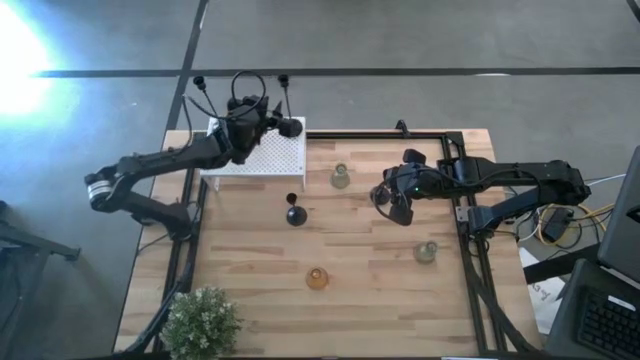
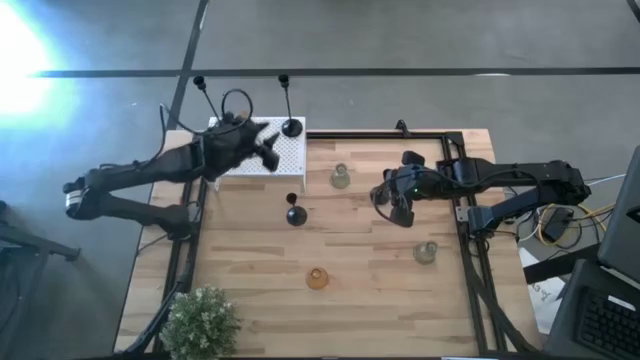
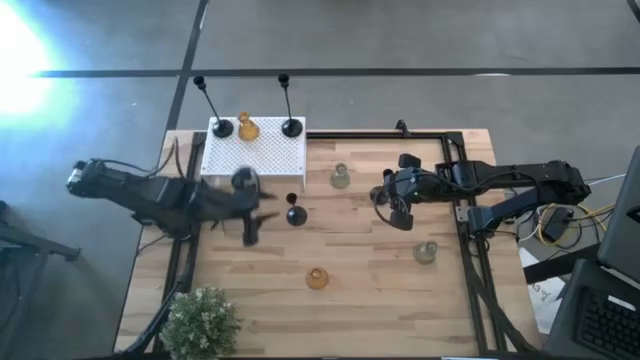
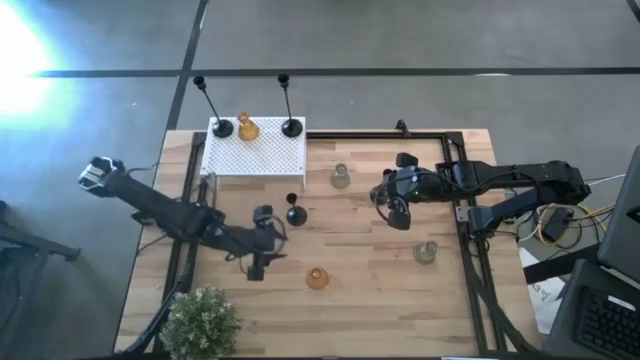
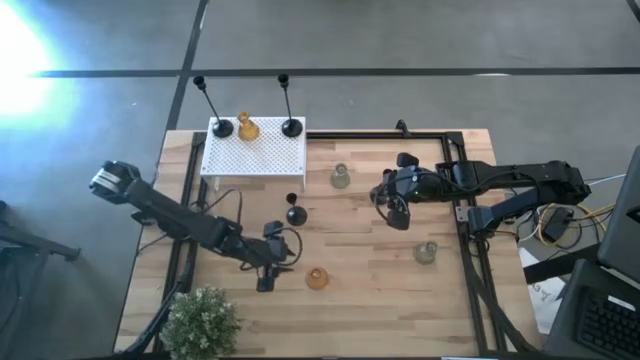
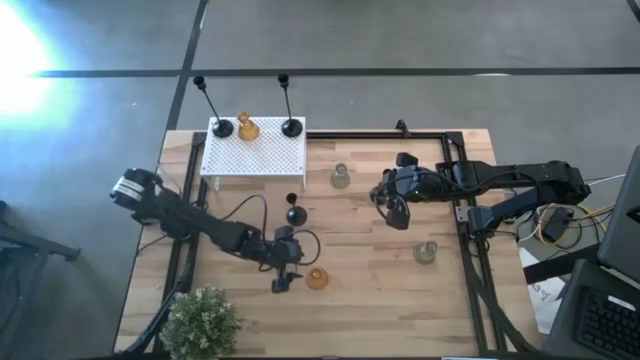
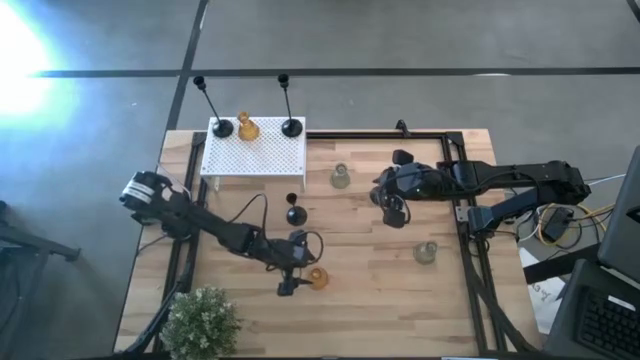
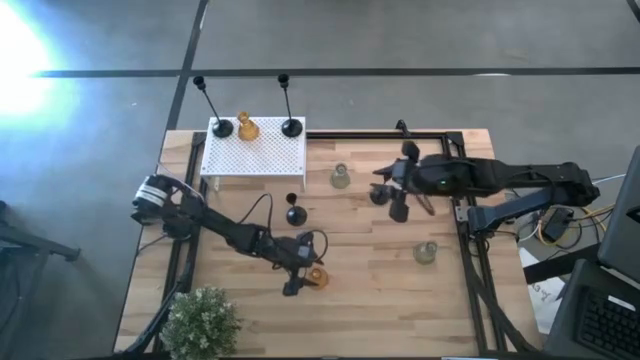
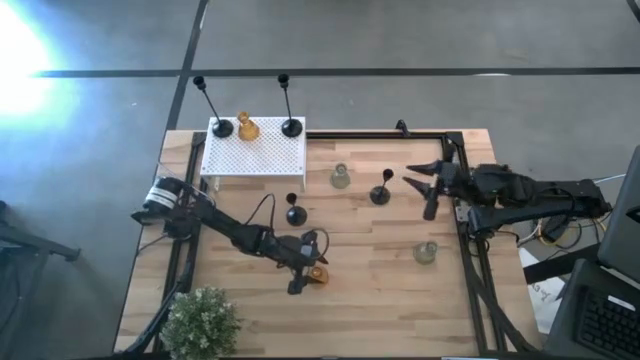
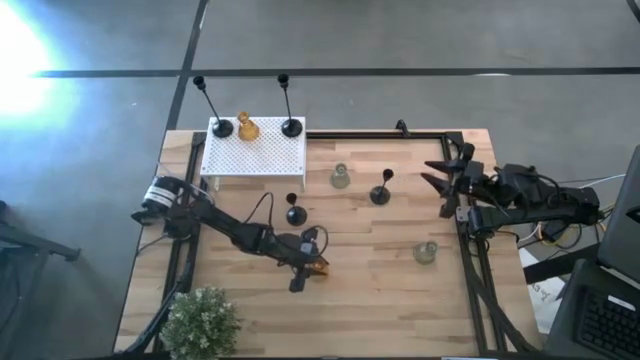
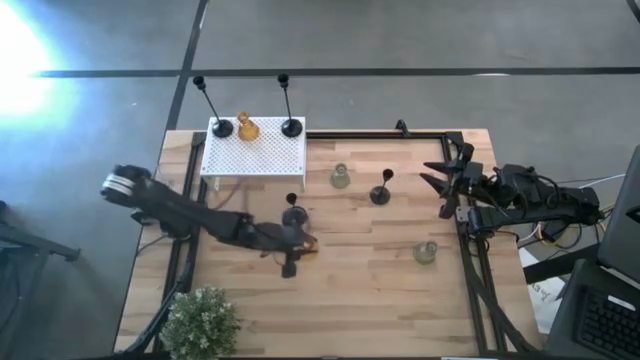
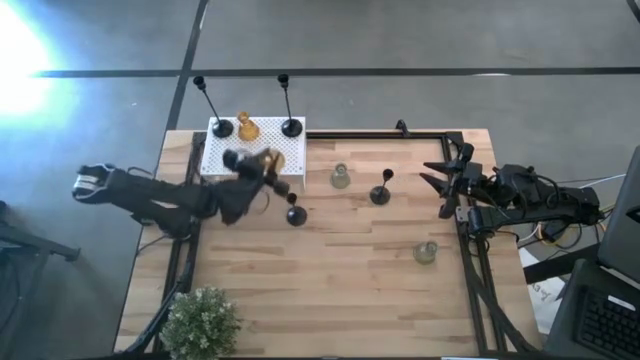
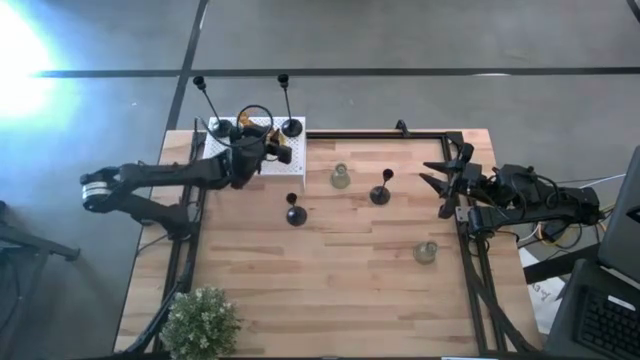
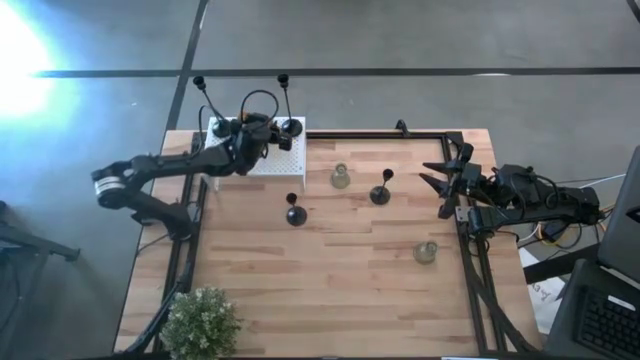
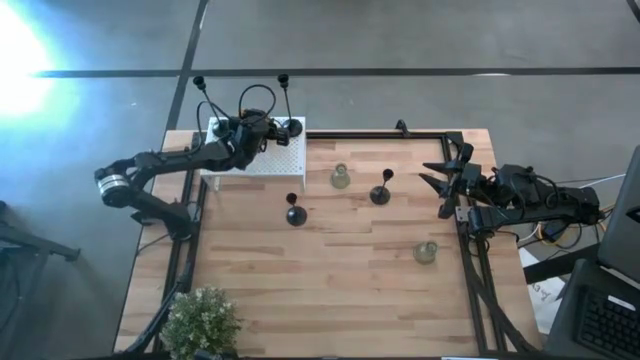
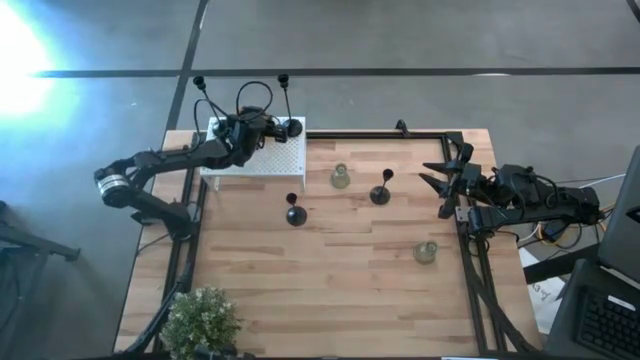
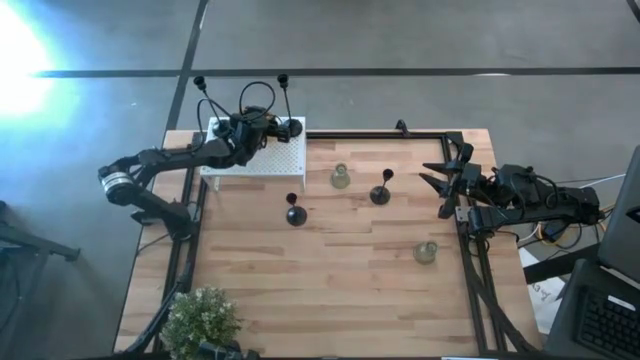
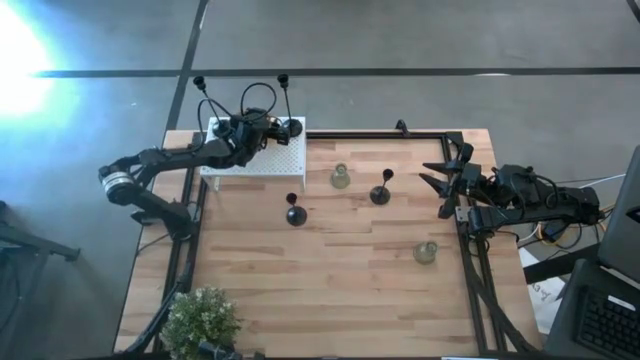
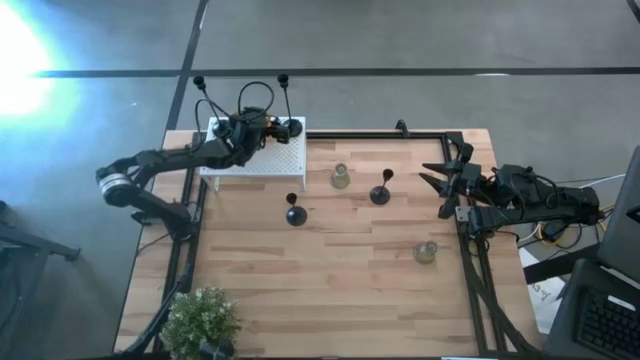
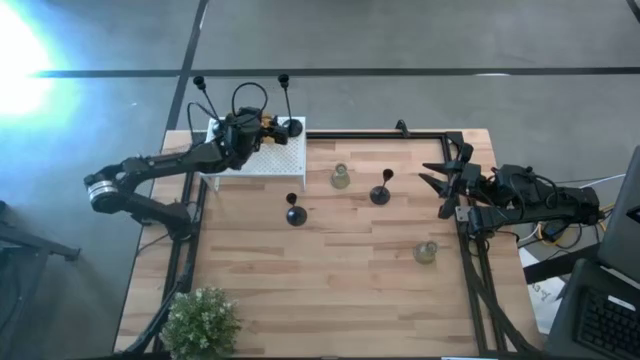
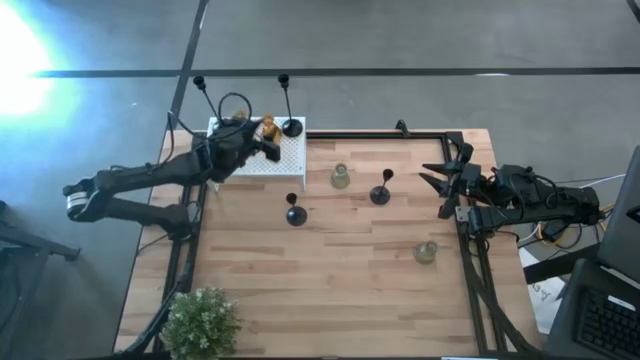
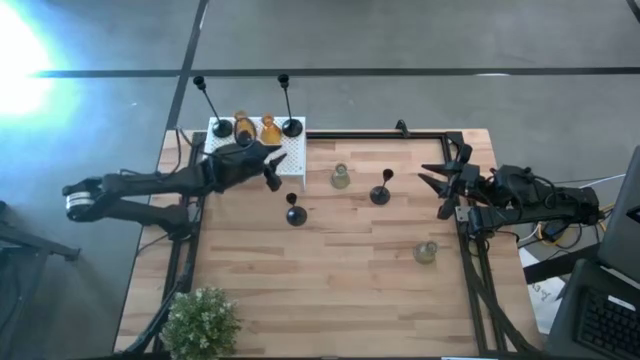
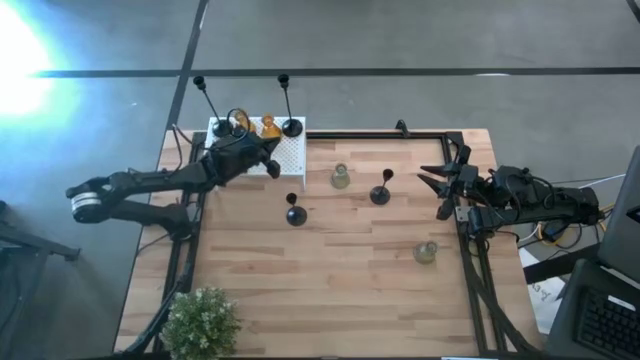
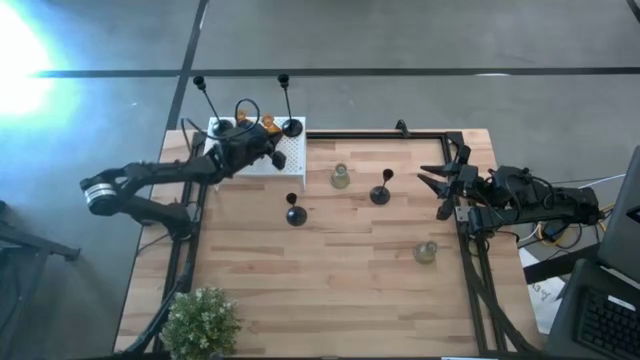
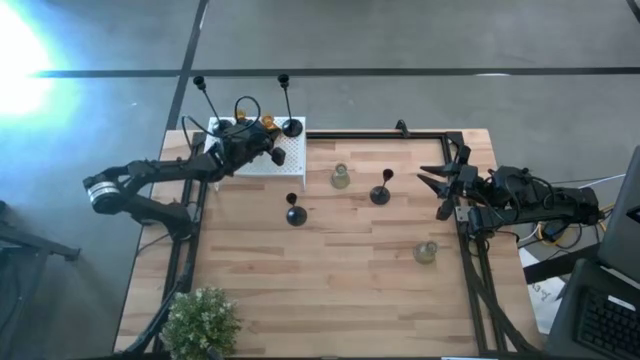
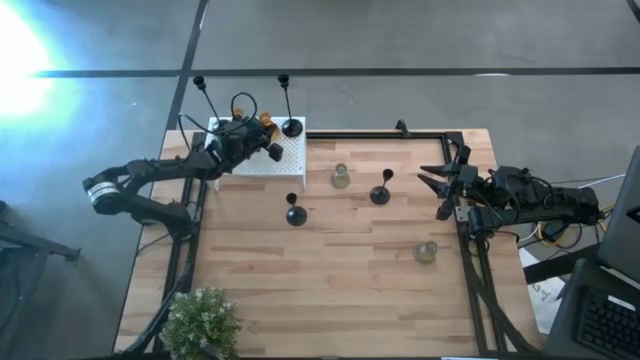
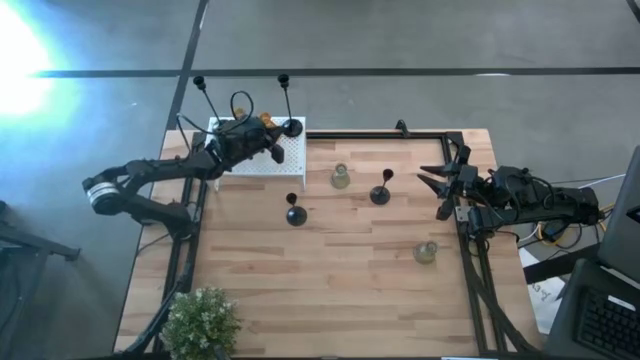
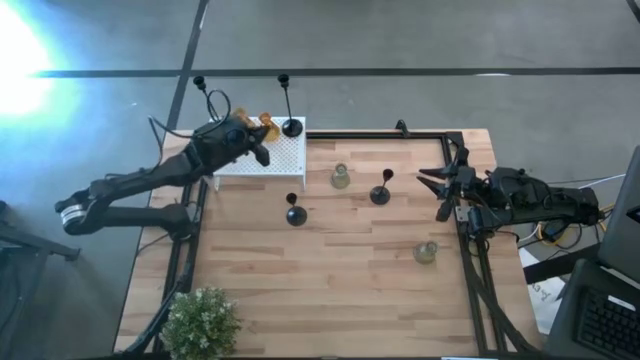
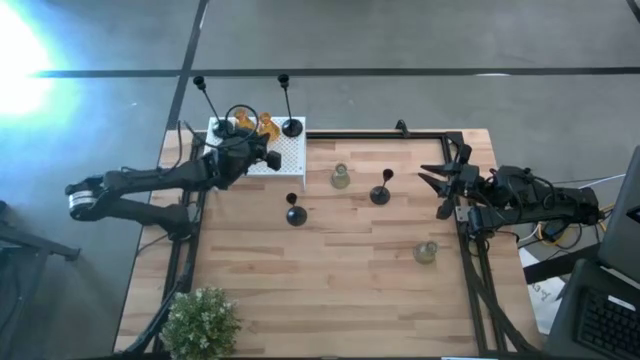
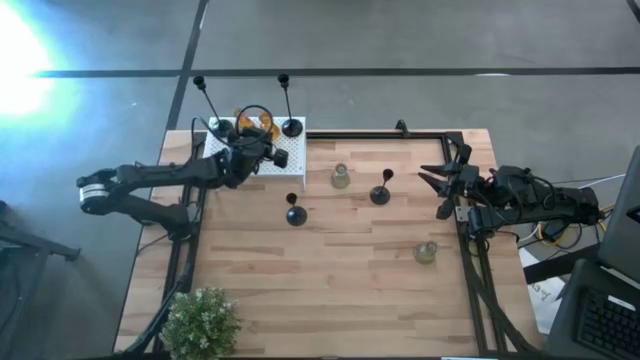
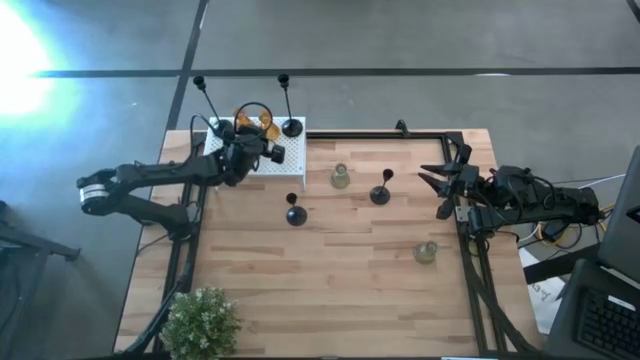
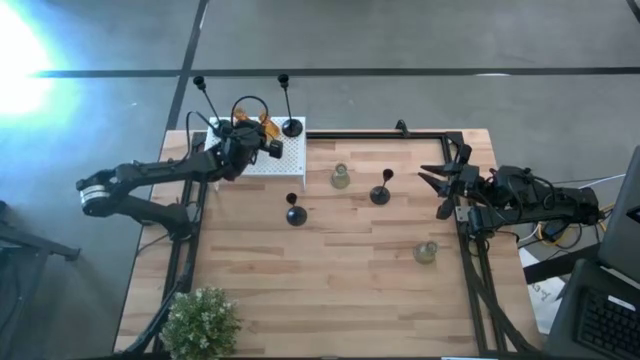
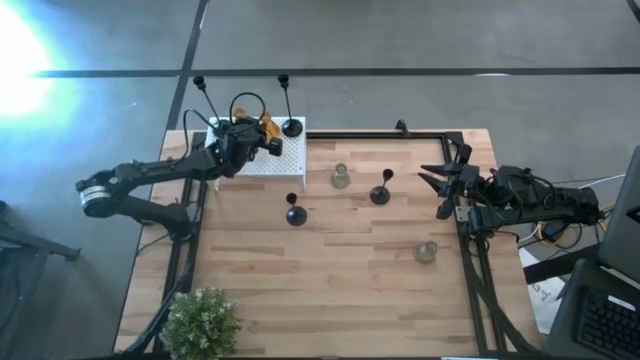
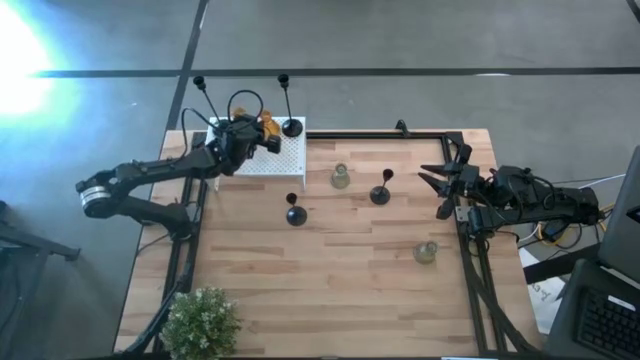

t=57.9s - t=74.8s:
Task: Pick & Place candle stick holders
Put the orange candle holder on the shelf

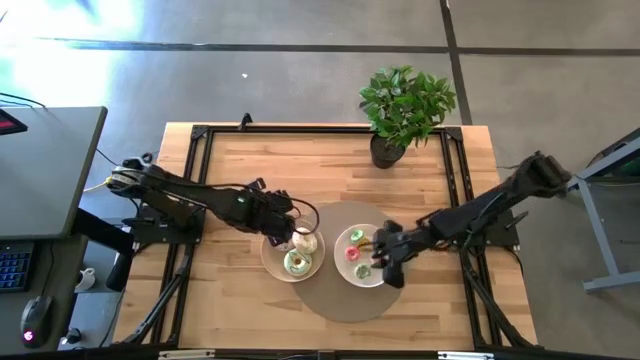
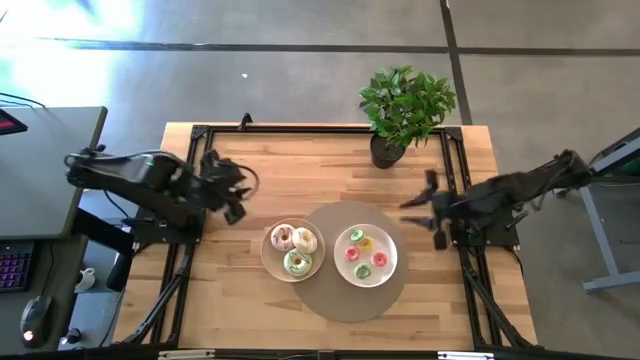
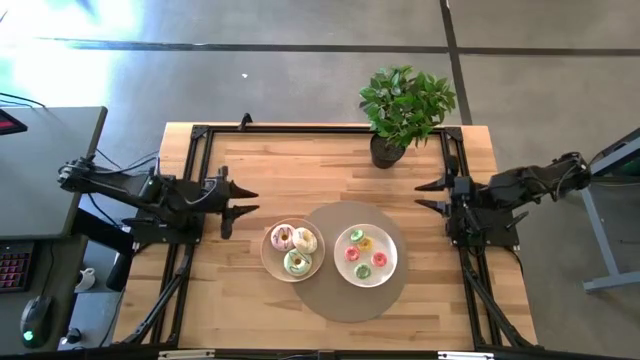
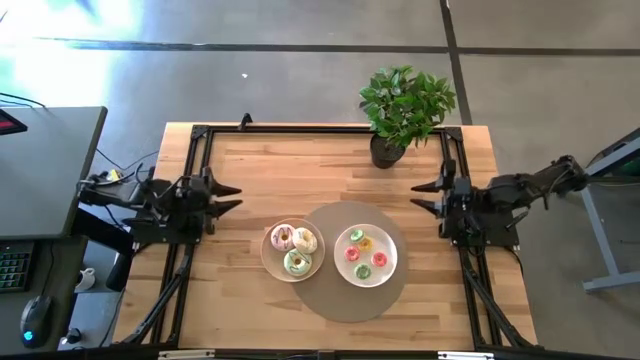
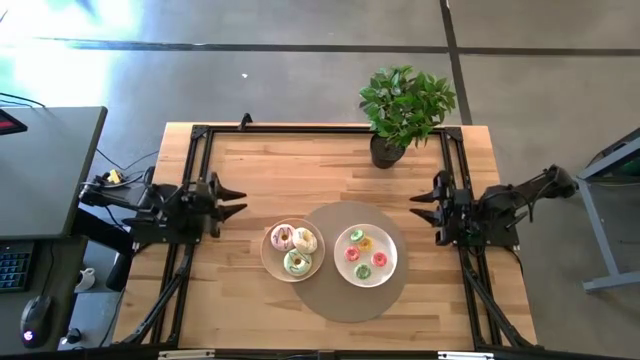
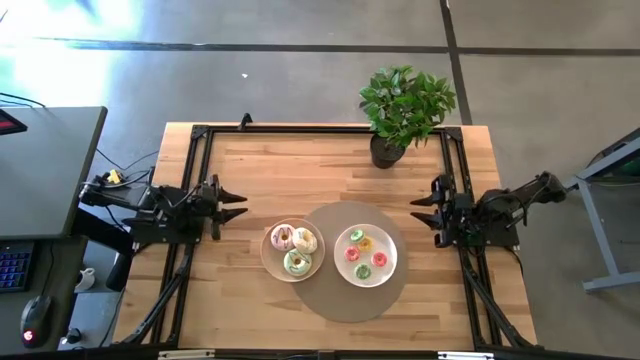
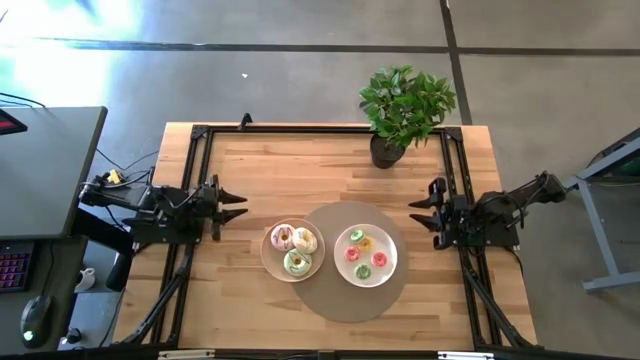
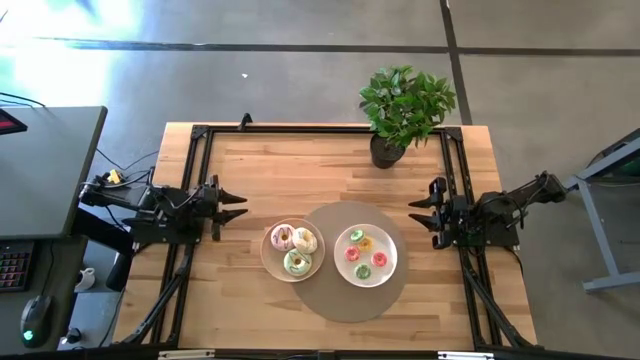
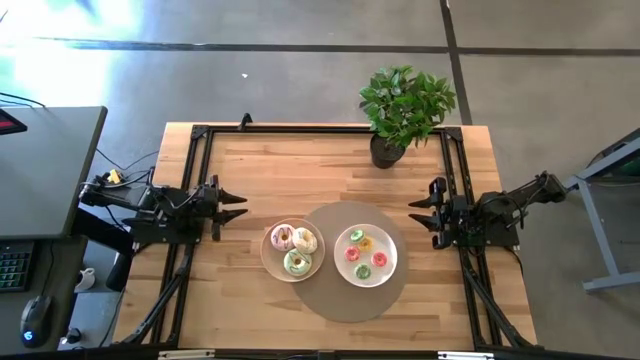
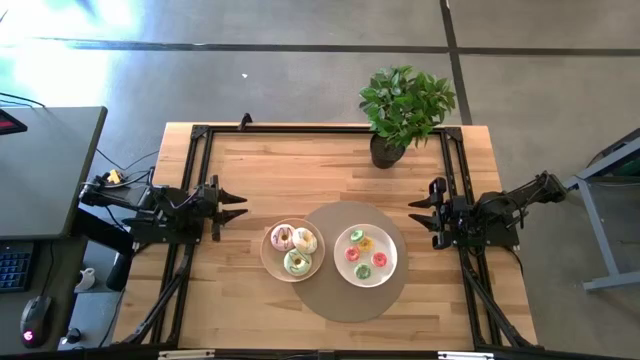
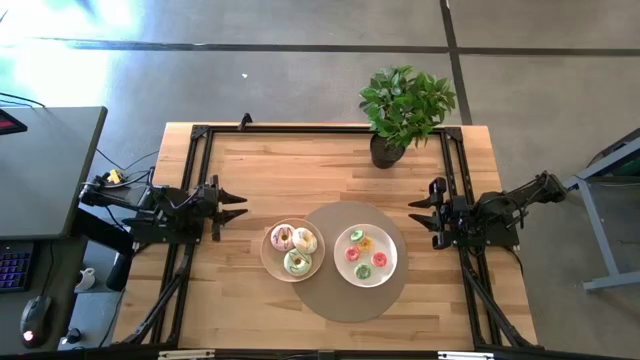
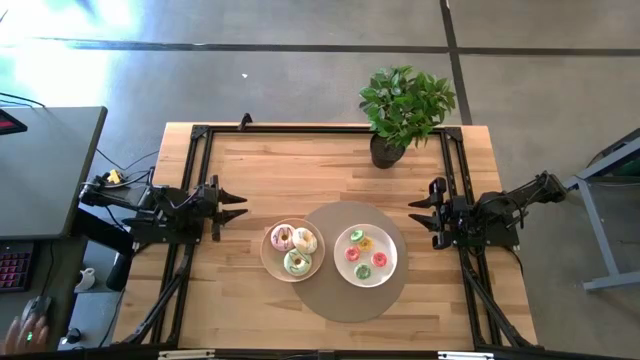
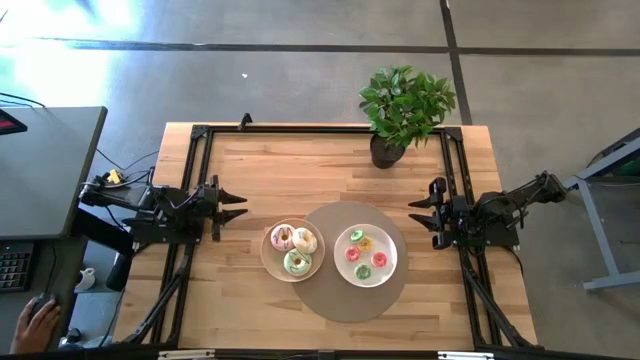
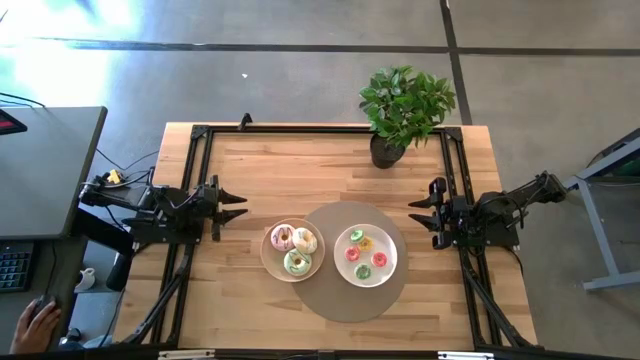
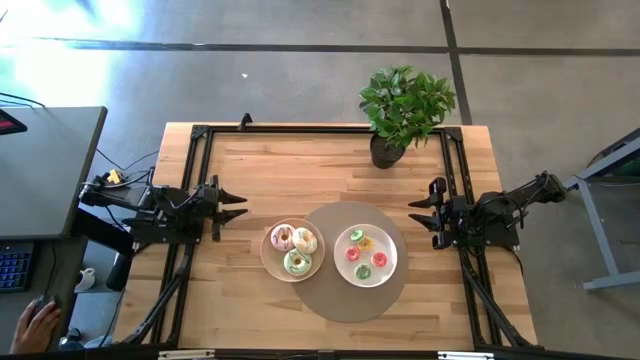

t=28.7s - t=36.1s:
Task: Pick & Place donuts
Return to Home Position
